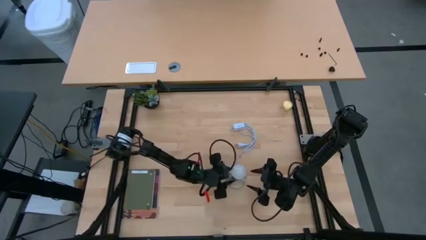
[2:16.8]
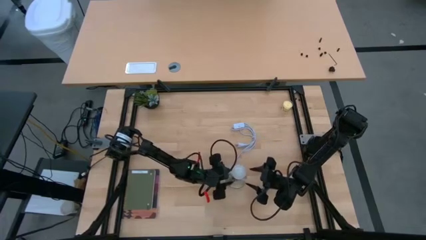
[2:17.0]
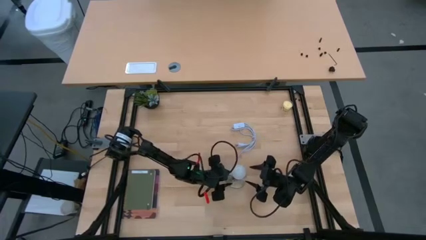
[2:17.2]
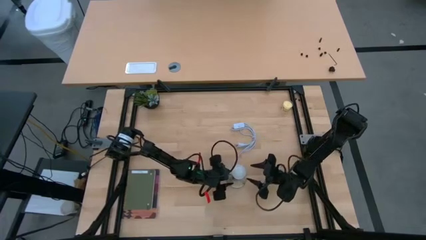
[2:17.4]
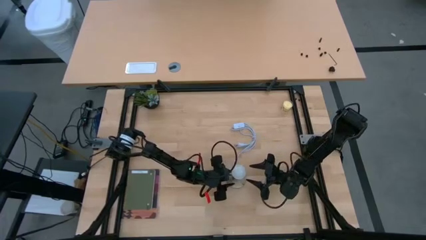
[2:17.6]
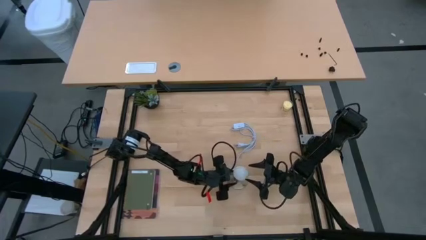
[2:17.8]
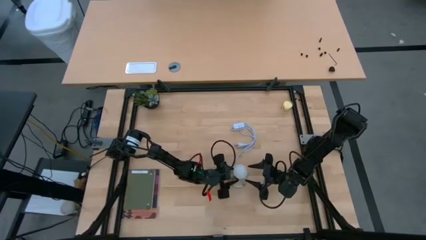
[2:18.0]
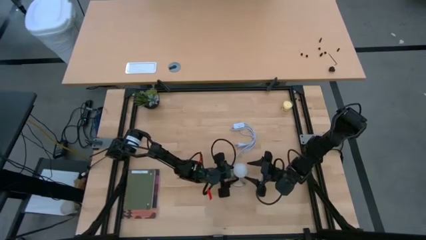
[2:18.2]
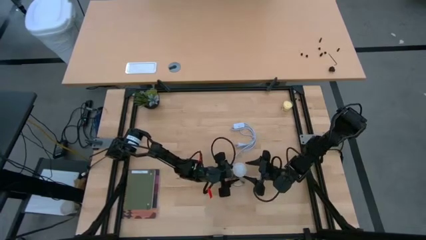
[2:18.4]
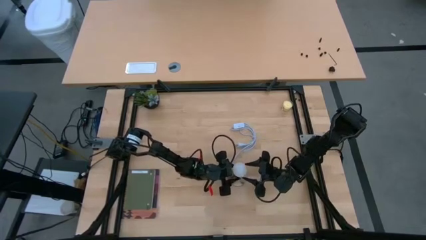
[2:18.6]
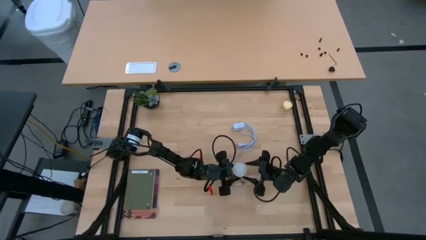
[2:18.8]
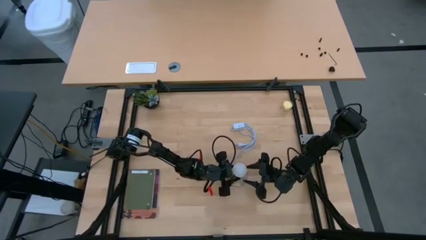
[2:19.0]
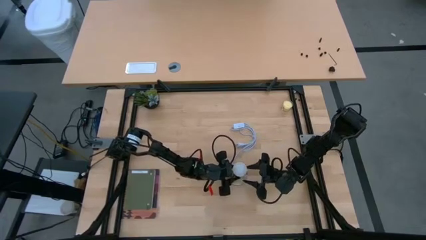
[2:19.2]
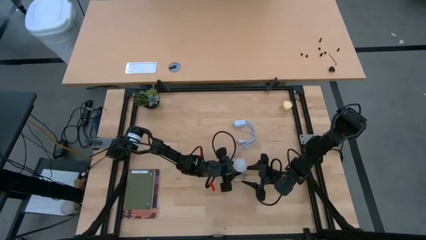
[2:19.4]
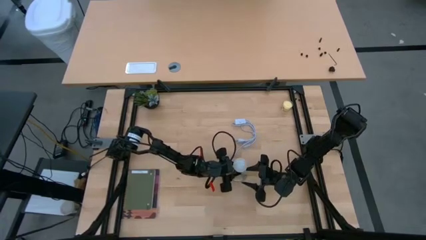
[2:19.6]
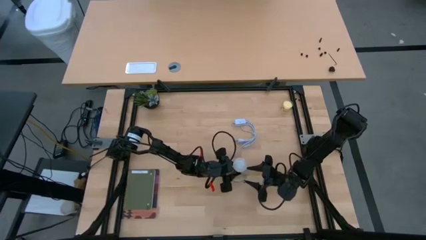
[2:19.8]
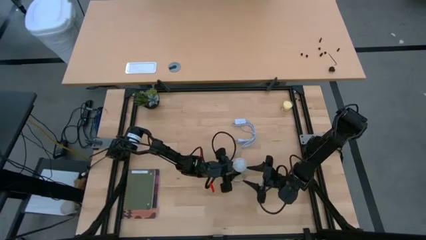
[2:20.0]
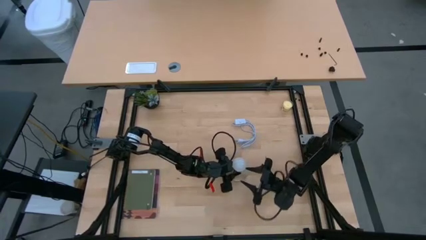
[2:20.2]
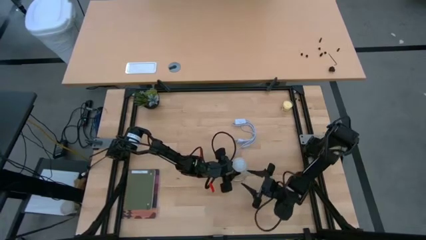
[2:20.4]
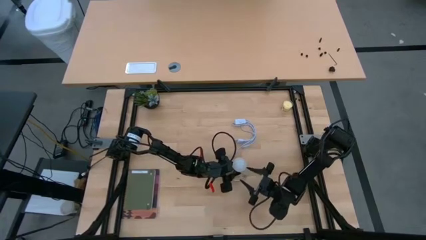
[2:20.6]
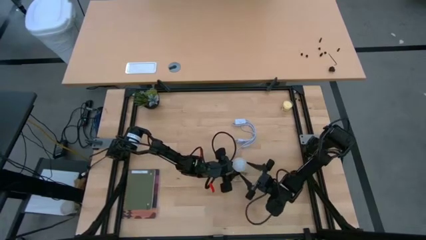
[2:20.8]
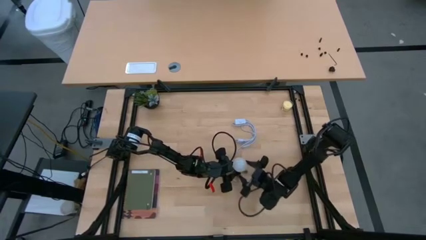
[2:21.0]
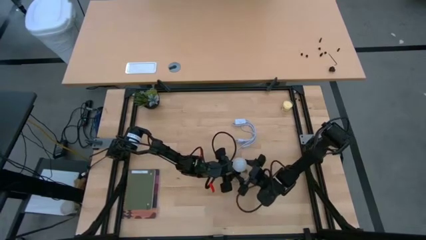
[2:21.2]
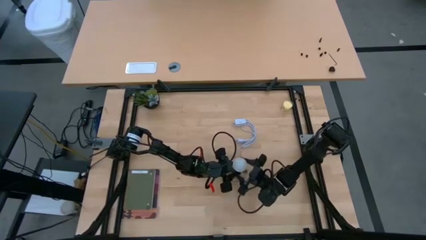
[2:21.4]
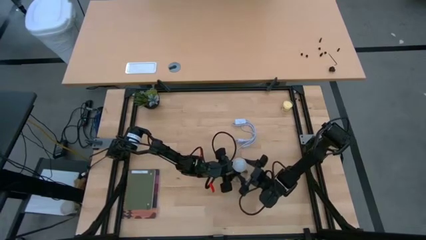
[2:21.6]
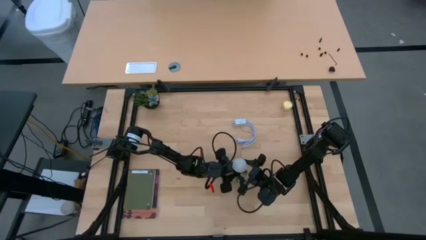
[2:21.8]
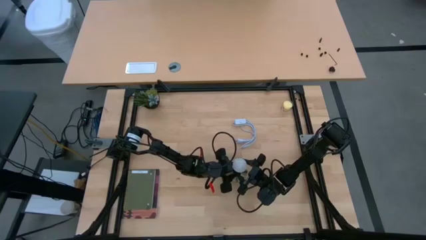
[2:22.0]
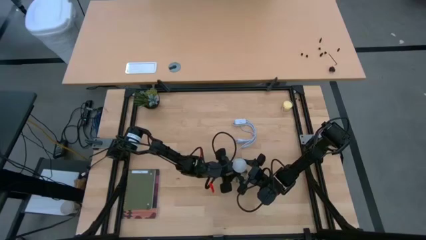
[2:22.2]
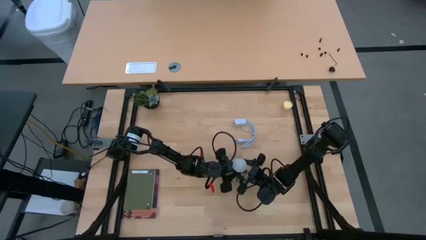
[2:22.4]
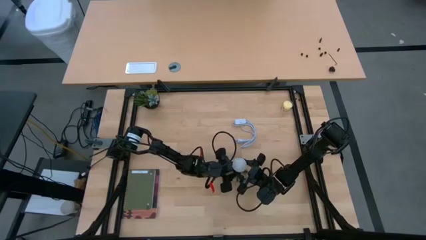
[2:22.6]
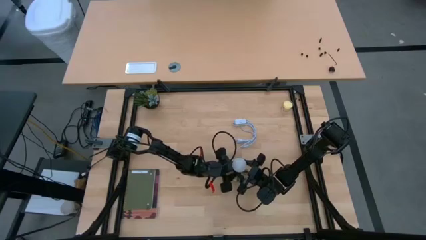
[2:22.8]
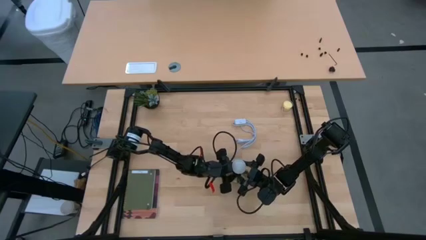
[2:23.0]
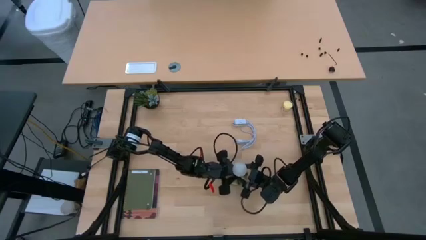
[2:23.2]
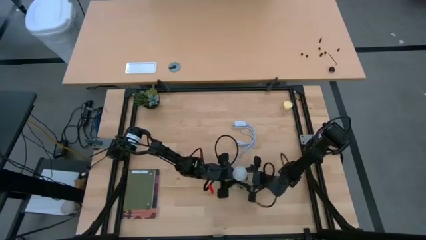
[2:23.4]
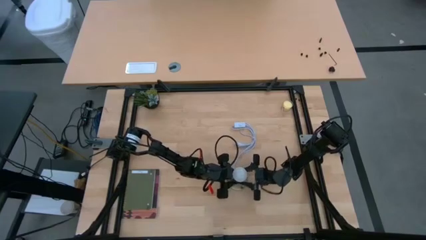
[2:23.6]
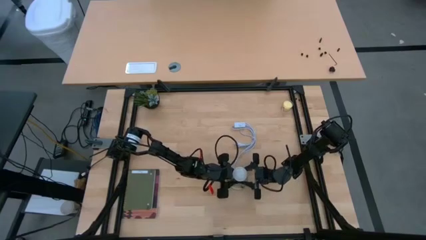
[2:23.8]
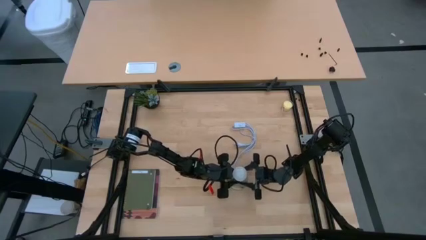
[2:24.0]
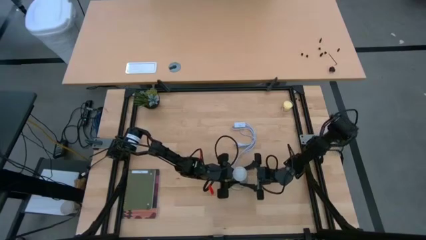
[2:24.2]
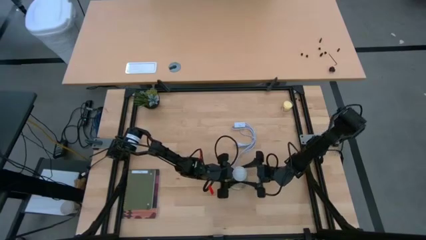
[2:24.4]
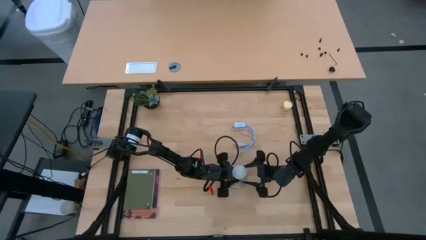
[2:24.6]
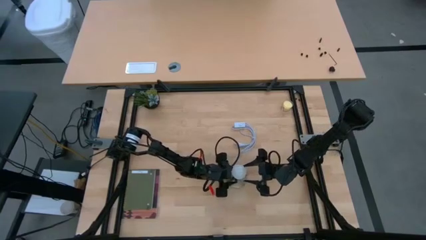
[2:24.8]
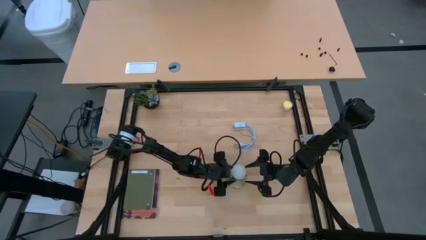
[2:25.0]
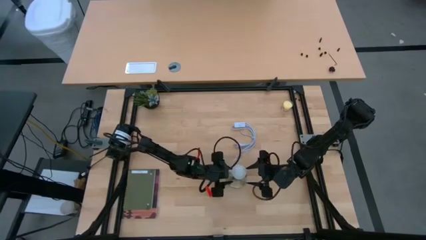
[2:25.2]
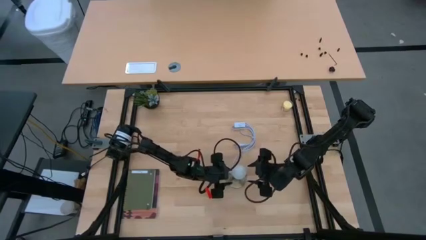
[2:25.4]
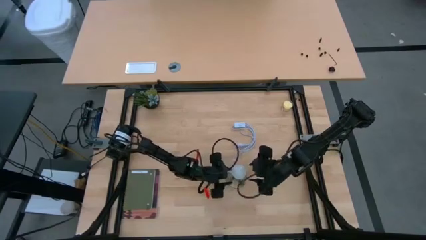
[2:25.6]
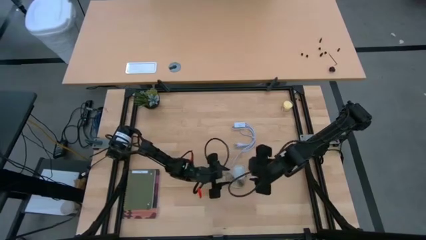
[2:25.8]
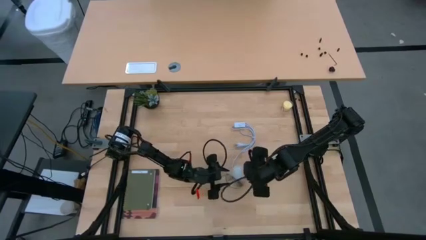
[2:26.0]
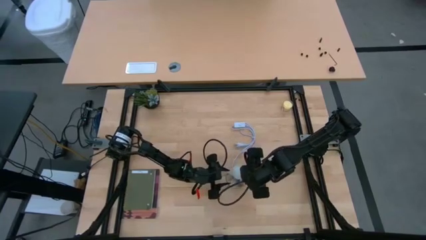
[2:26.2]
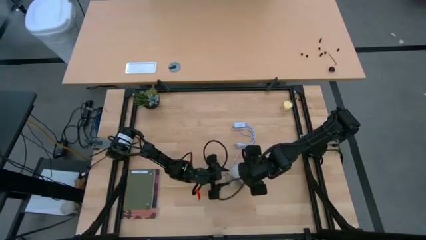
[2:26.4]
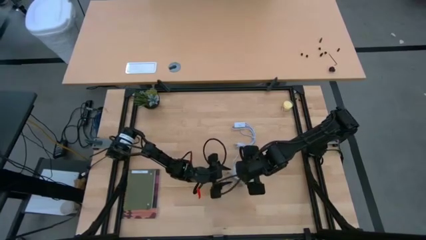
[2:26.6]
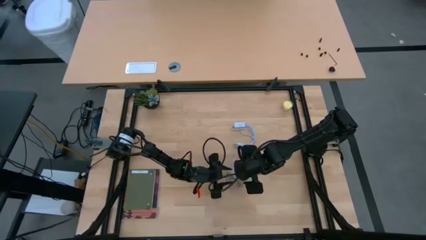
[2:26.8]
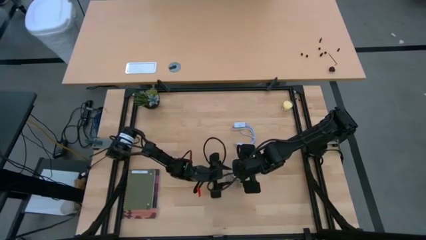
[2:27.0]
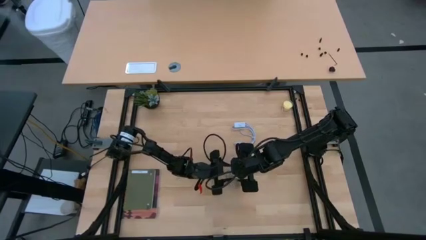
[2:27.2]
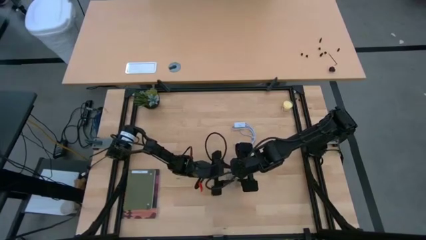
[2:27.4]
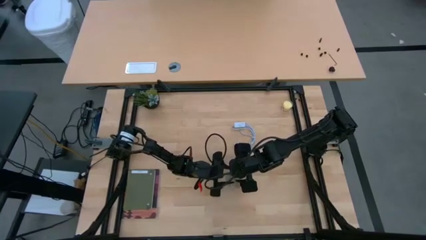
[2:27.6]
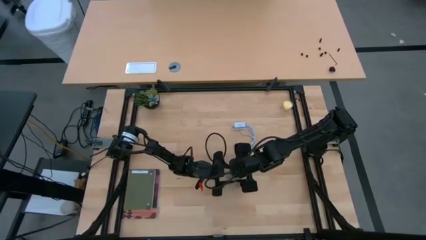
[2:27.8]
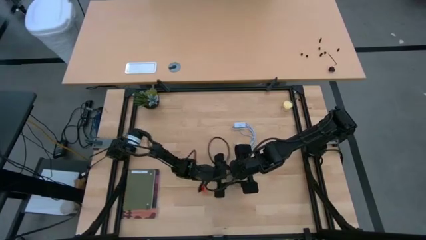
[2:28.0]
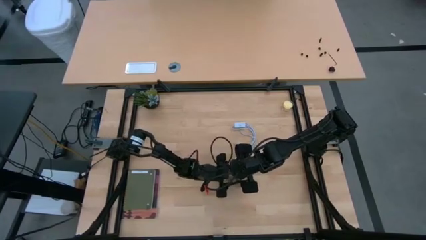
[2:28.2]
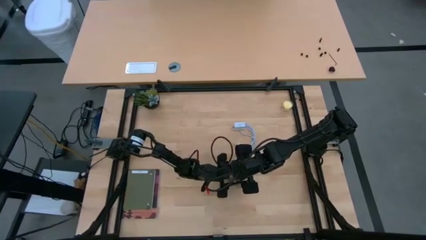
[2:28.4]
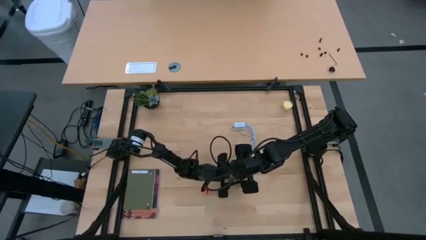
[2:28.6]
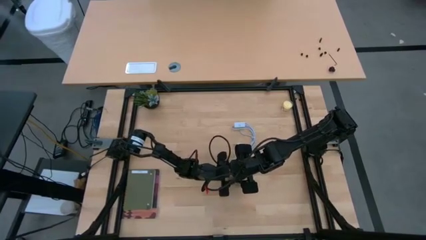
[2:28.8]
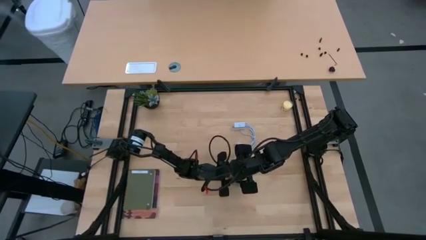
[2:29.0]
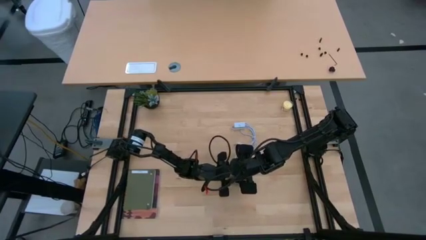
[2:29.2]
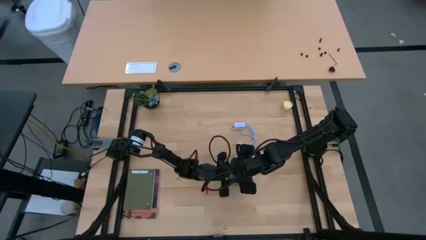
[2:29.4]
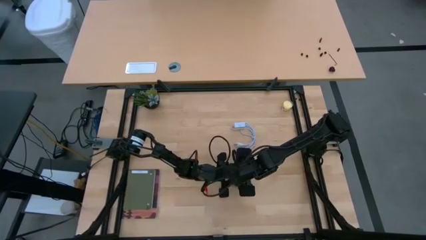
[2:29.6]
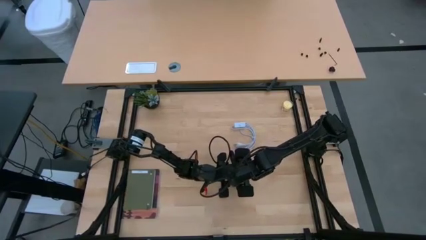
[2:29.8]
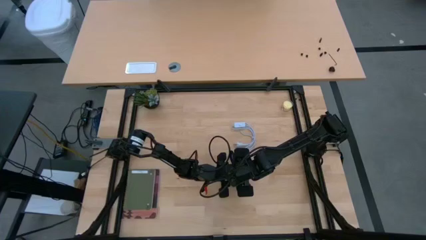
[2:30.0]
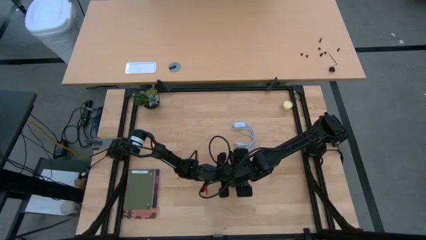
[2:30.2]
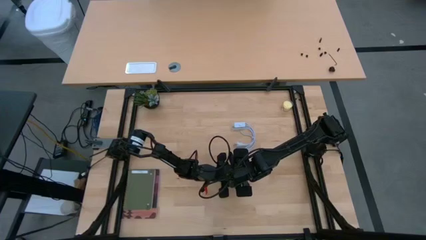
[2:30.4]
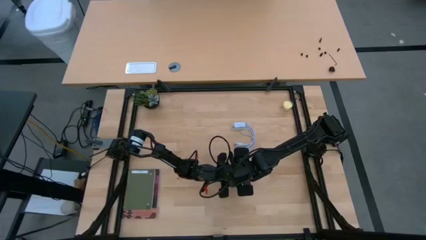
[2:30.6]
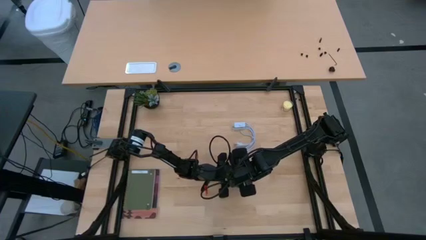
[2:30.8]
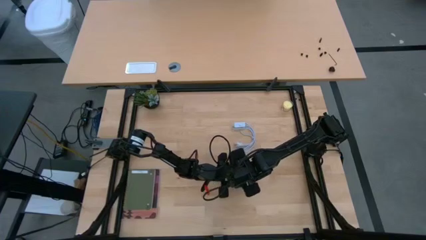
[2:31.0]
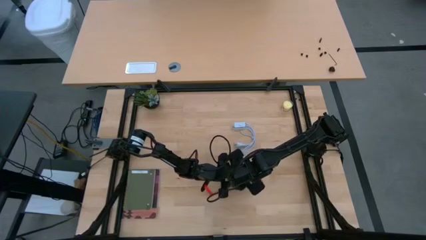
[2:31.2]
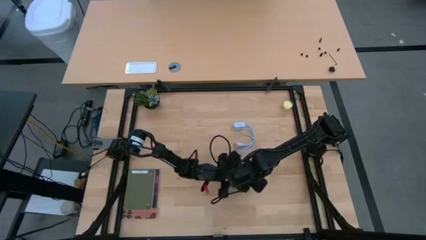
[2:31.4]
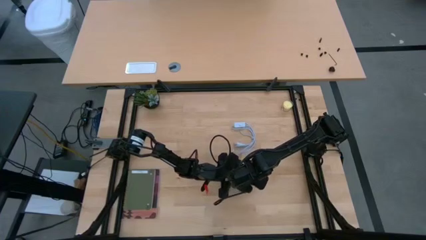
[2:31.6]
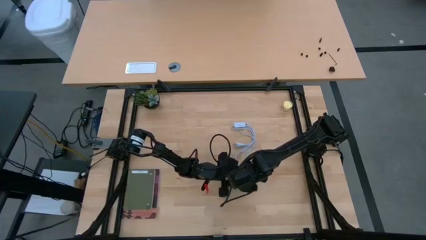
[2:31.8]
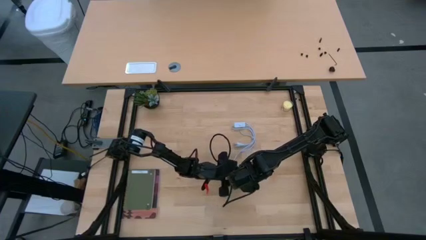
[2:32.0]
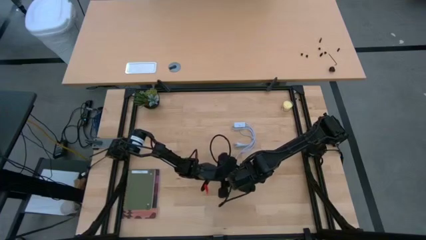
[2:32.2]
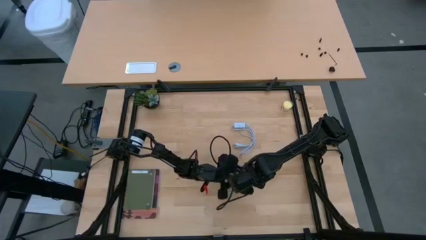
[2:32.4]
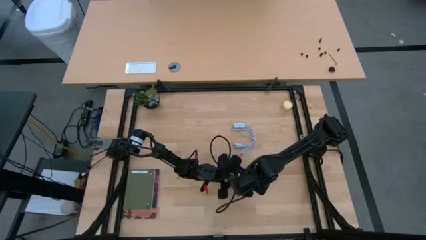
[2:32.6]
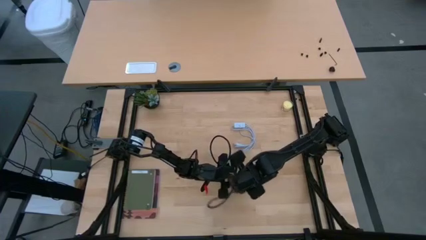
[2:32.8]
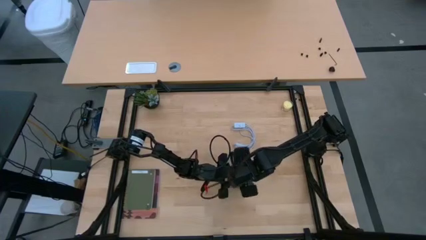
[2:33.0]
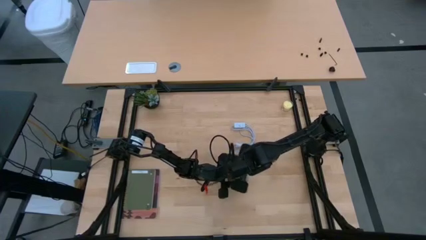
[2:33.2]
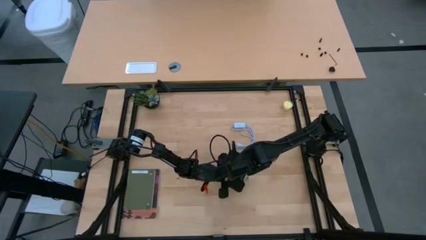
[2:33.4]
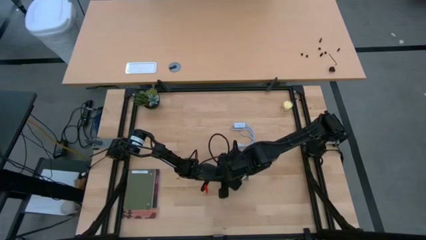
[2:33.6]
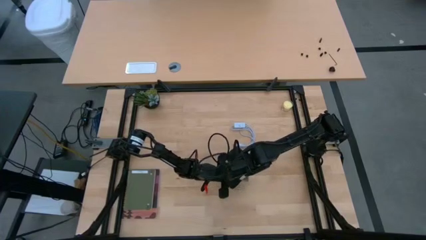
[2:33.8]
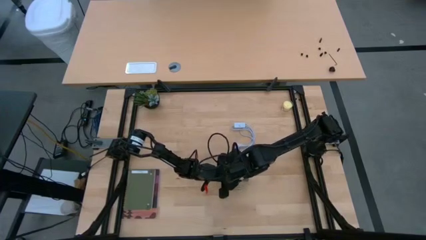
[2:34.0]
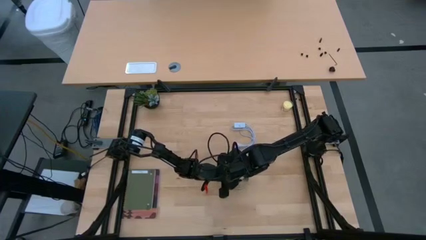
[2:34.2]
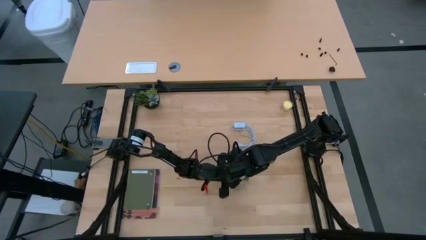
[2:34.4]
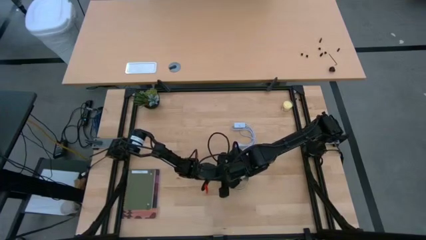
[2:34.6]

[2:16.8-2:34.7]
Task: Screw lightbulb
Remove the lightbulb from the lamp
